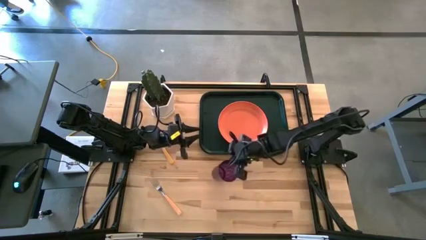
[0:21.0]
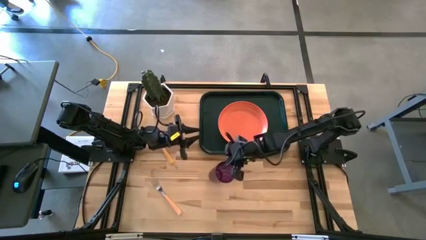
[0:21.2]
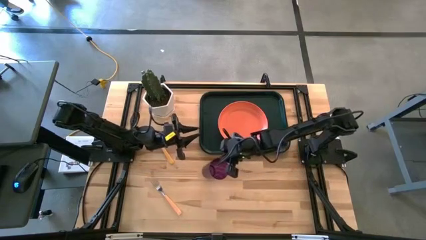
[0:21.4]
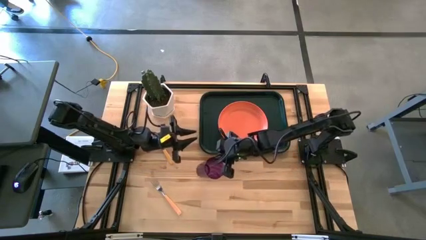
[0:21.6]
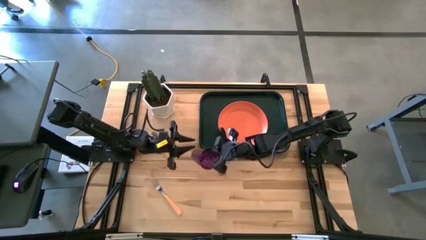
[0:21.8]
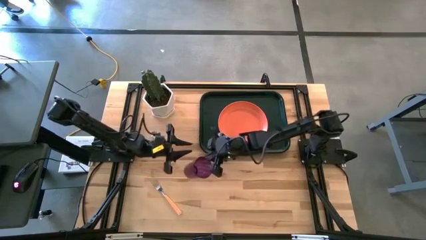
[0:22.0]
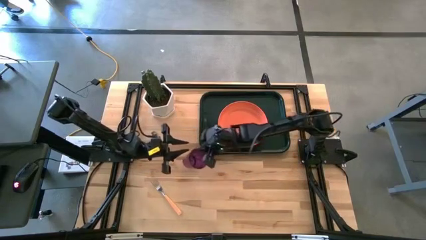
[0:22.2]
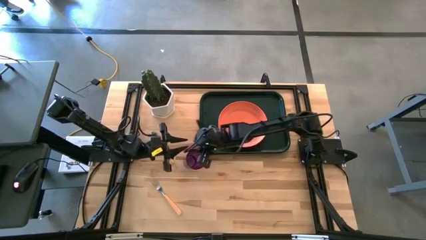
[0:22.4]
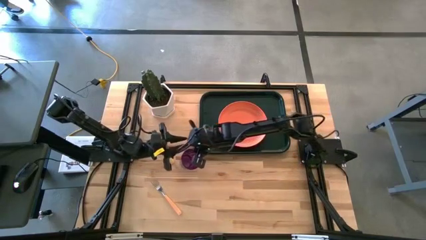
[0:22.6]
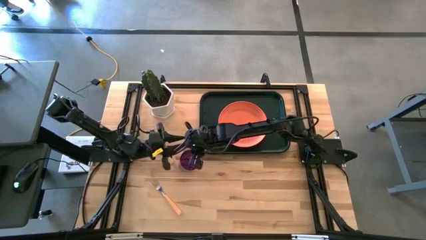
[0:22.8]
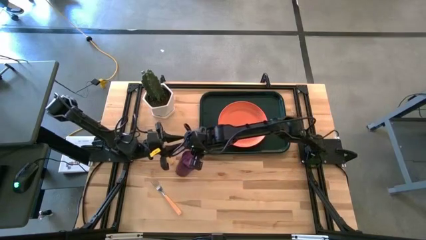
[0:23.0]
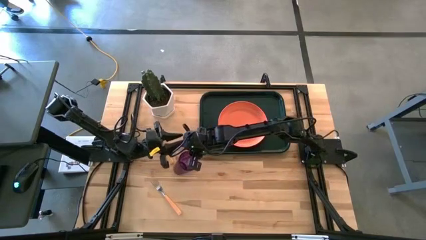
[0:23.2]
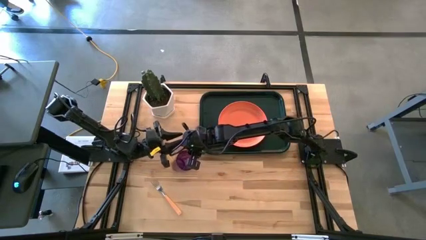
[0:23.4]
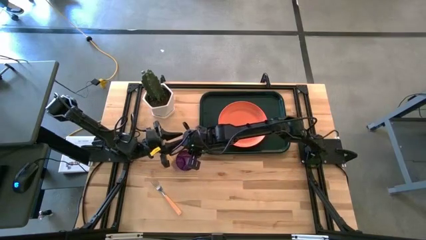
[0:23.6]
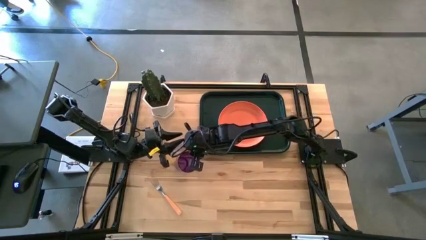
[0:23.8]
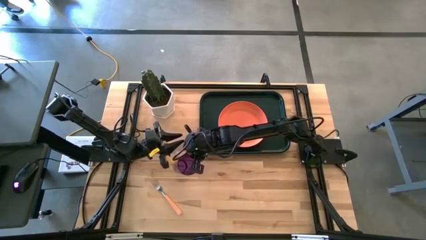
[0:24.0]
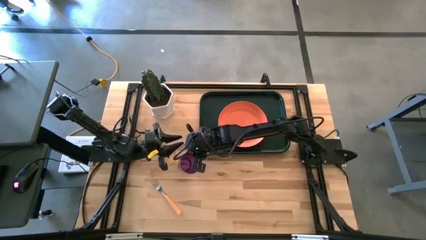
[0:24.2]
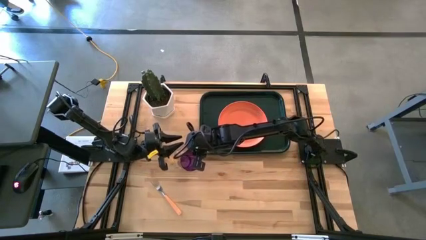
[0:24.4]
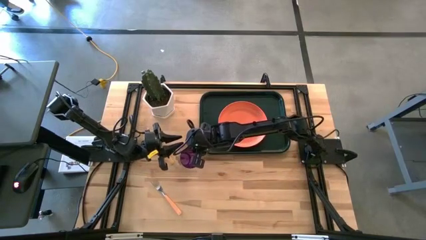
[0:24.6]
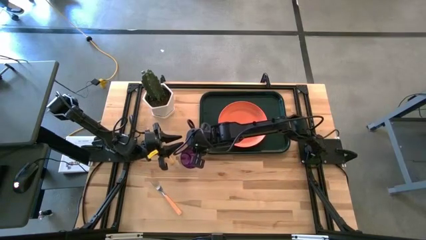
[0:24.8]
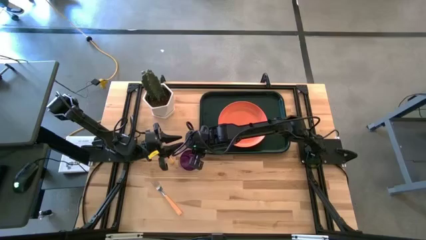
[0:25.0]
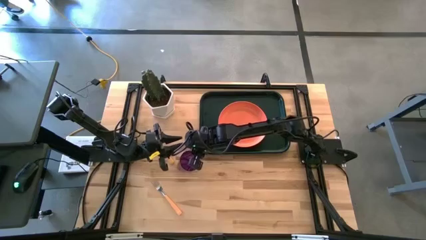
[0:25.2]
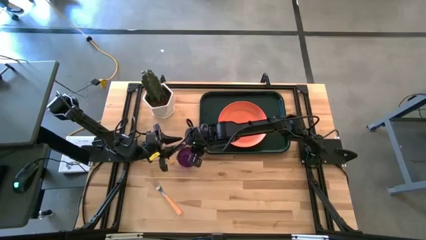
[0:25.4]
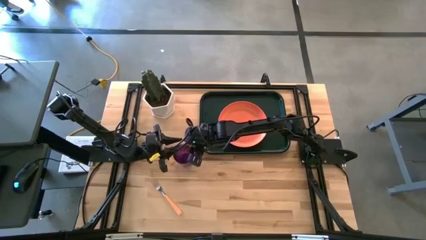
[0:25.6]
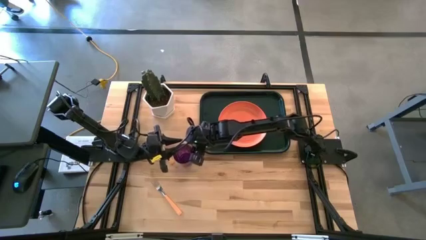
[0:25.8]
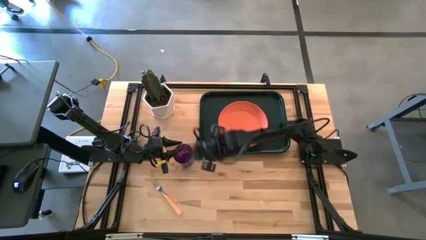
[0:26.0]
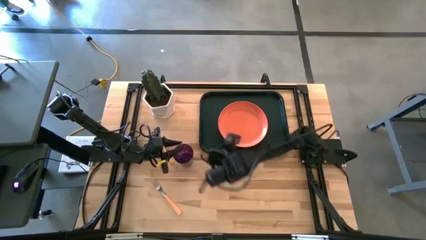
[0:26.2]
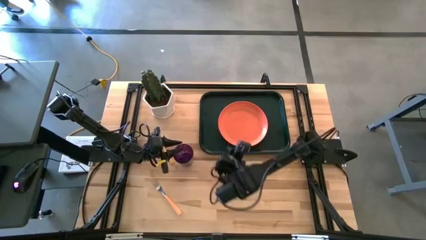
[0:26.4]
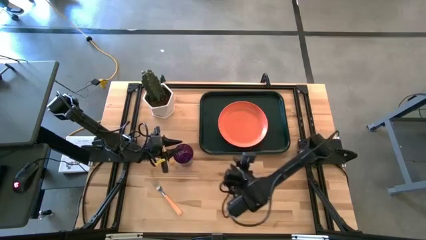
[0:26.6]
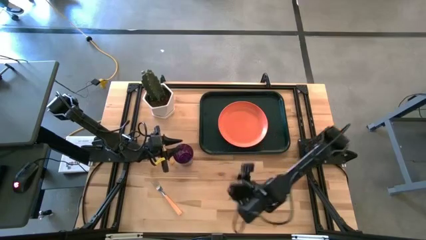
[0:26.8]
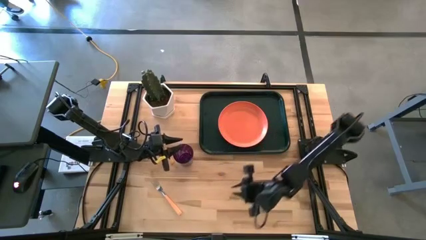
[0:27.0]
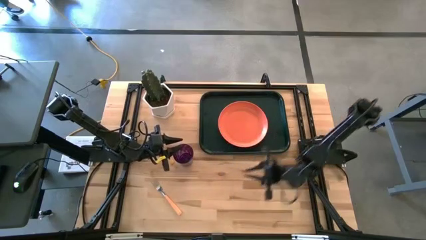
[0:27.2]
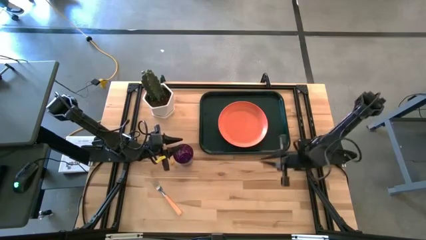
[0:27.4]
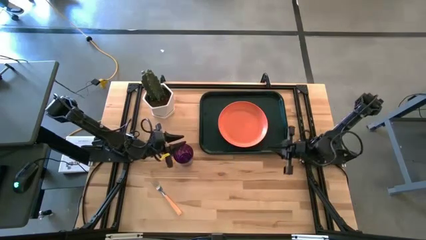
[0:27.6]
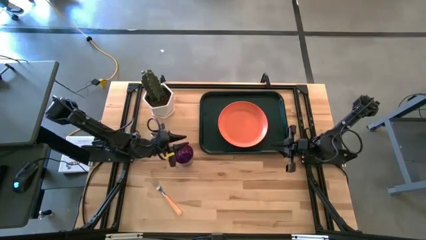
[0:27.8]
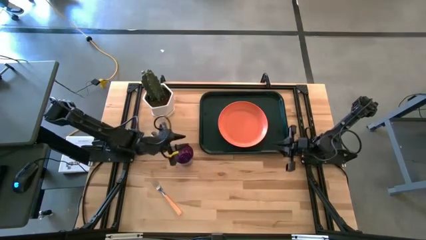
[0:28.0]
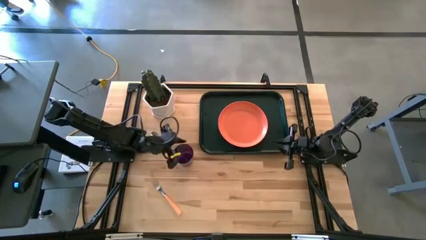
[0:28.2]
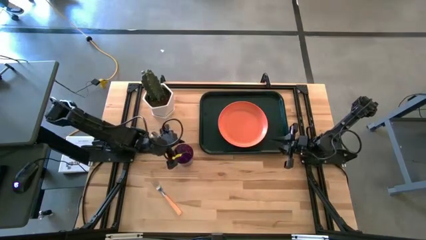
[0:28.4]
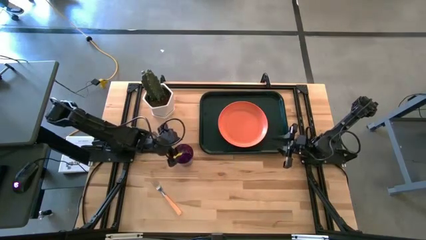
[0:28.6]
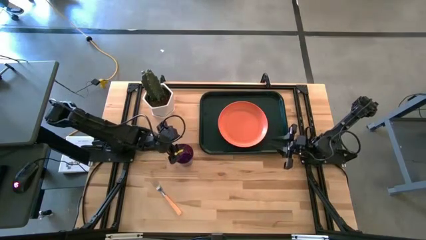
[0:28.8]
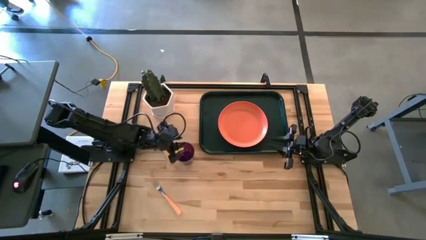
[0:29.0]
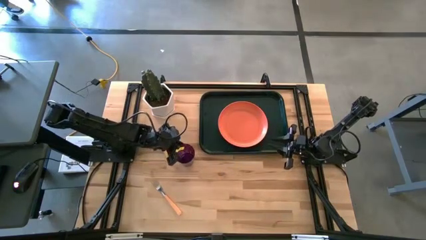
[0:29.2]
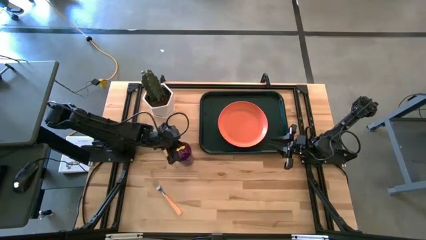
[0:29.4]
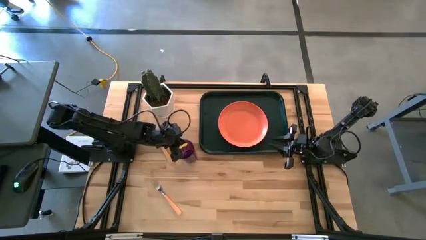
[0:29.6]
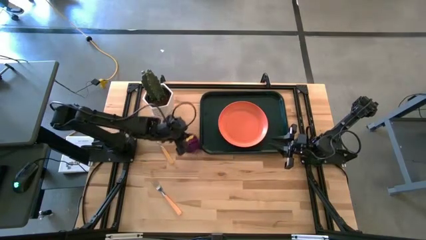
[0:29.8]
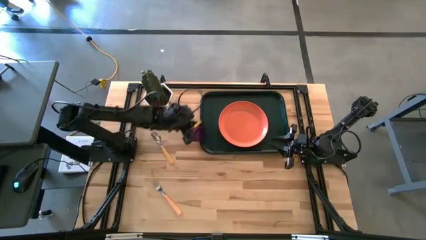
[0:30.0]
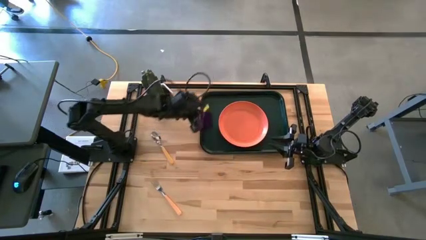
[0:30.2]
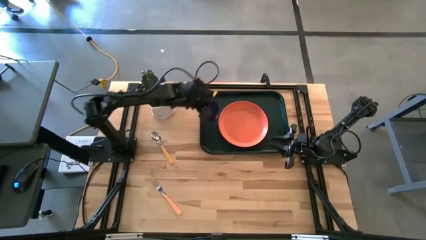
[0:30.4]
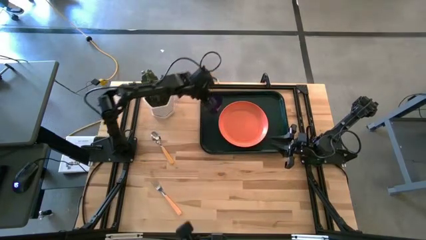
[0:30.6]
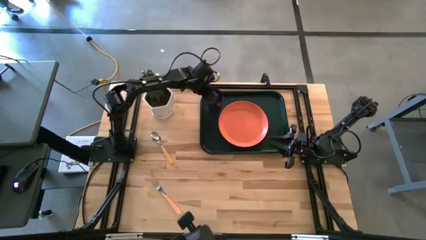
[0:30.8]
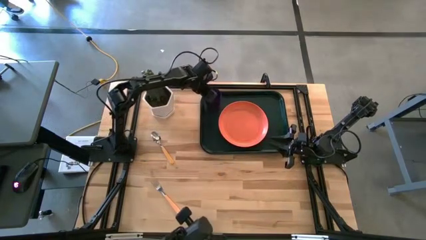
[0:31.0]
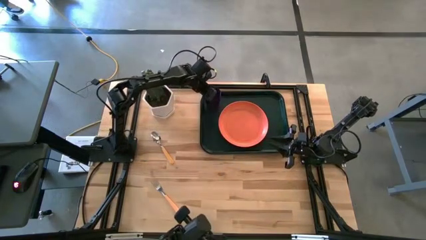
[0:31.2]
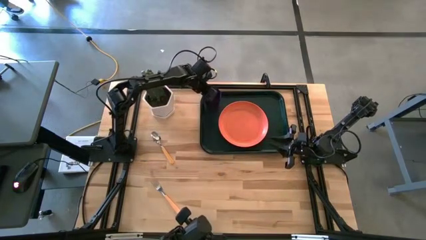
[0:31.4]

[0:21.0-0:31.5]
Task: Pick and place plate/cup/fork/spoon on tray
Put the purple cup on the black tray to the top left of the orange plate
